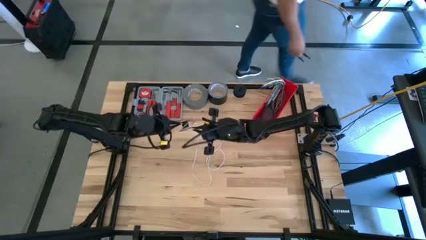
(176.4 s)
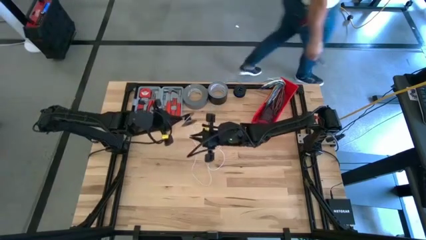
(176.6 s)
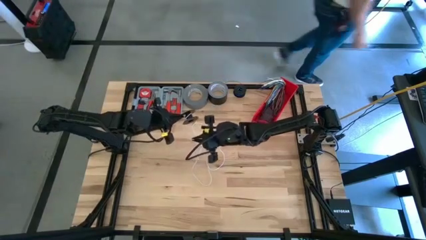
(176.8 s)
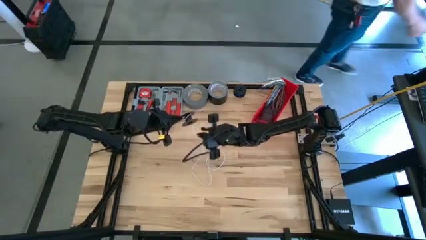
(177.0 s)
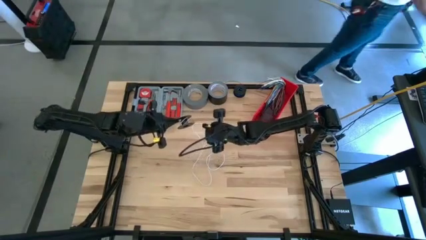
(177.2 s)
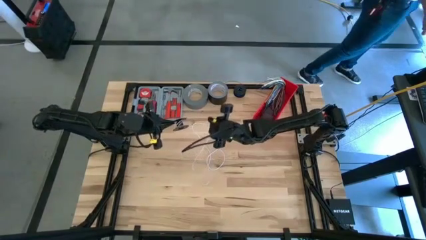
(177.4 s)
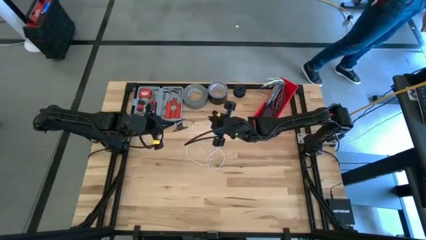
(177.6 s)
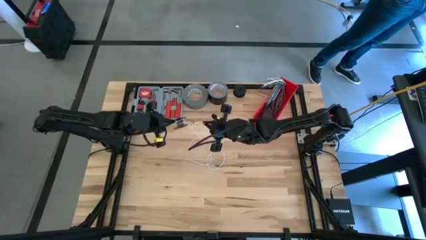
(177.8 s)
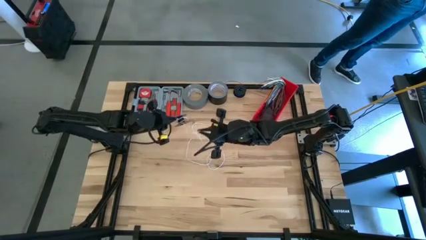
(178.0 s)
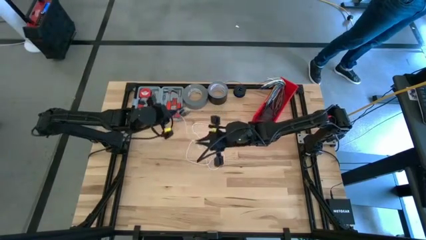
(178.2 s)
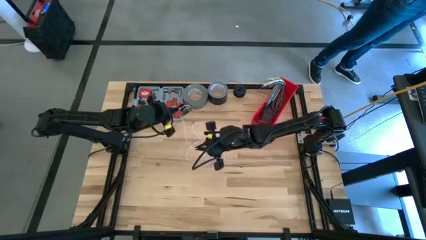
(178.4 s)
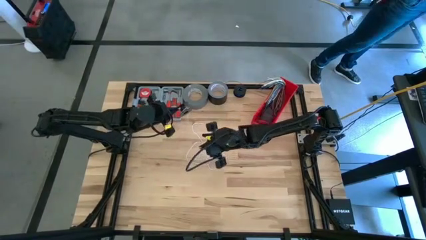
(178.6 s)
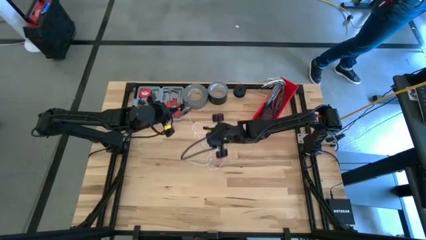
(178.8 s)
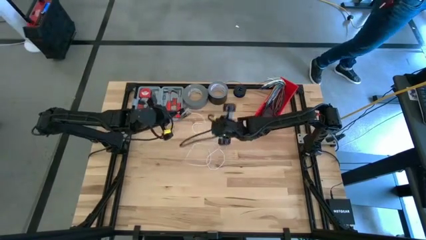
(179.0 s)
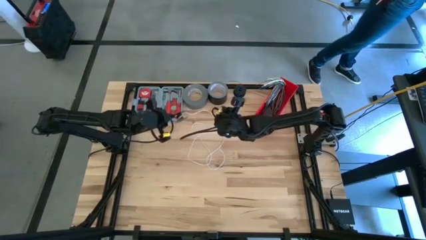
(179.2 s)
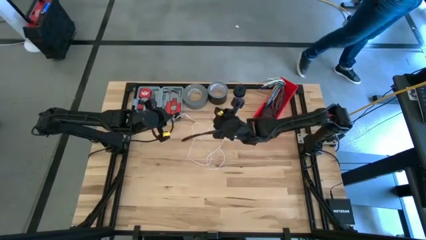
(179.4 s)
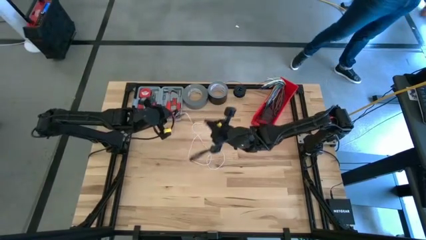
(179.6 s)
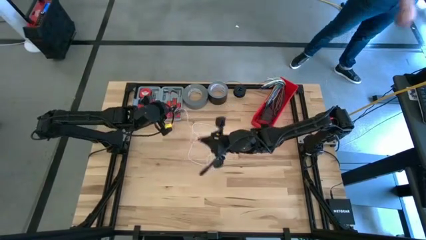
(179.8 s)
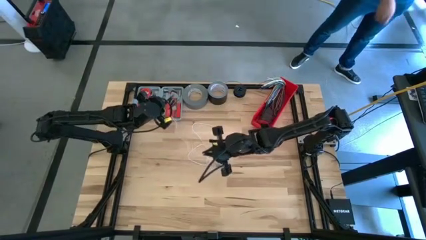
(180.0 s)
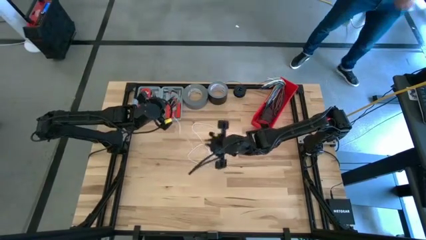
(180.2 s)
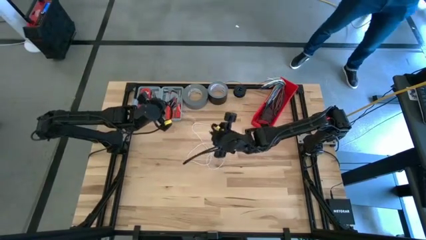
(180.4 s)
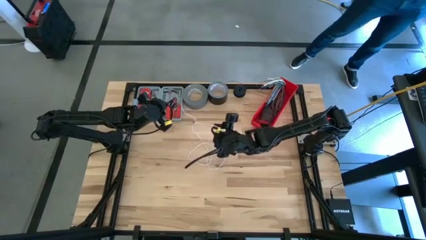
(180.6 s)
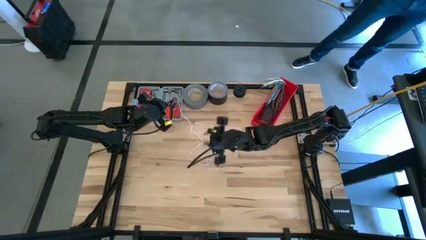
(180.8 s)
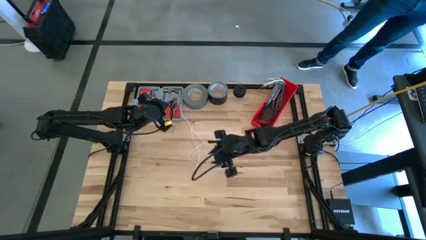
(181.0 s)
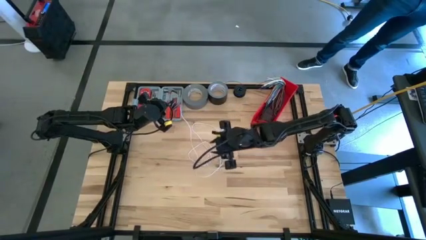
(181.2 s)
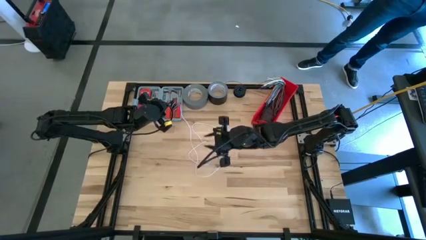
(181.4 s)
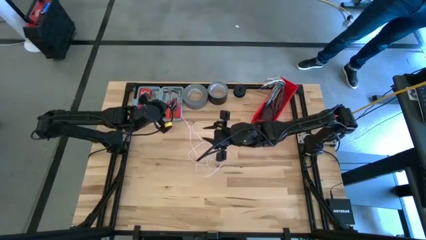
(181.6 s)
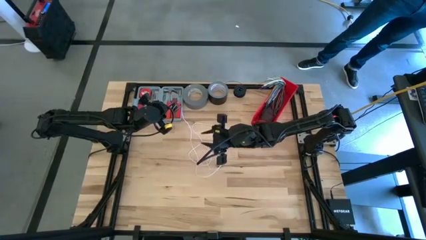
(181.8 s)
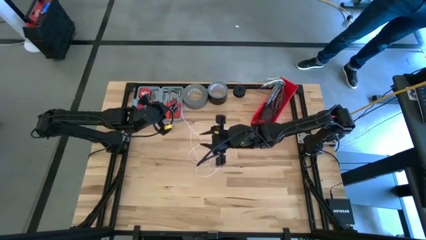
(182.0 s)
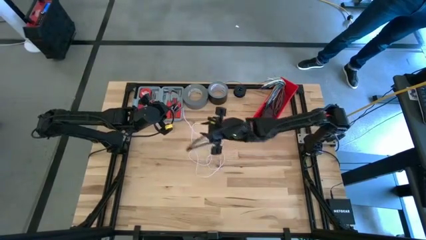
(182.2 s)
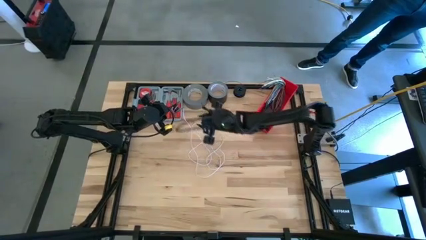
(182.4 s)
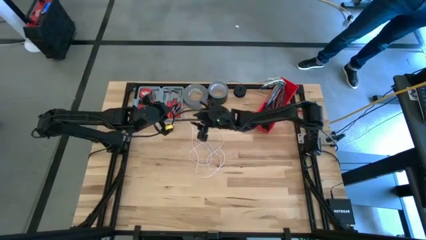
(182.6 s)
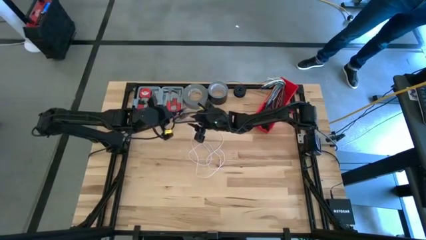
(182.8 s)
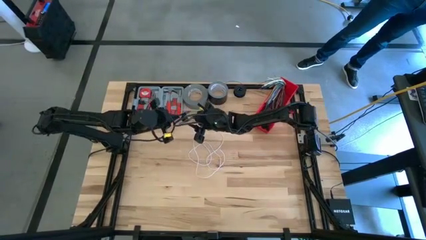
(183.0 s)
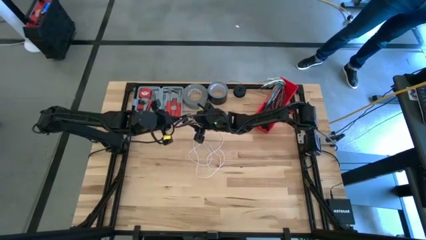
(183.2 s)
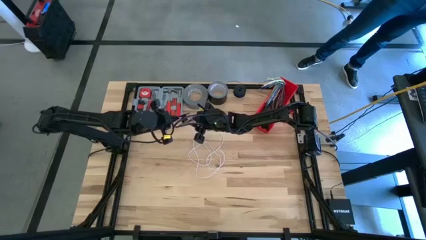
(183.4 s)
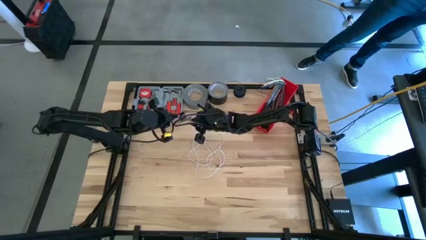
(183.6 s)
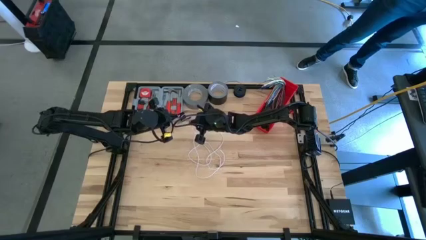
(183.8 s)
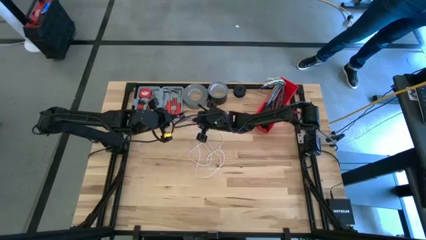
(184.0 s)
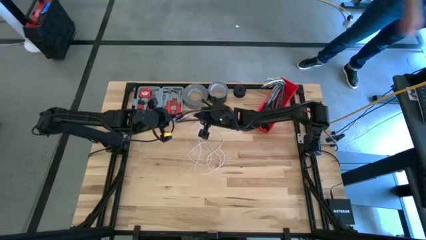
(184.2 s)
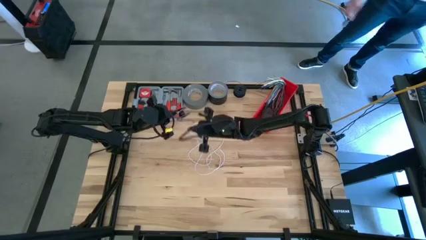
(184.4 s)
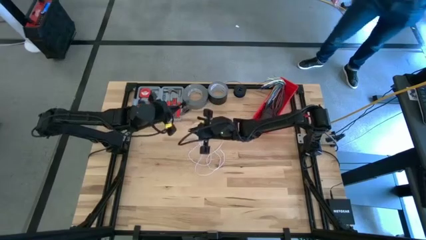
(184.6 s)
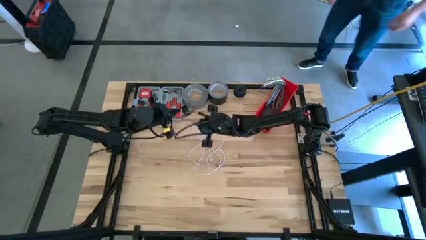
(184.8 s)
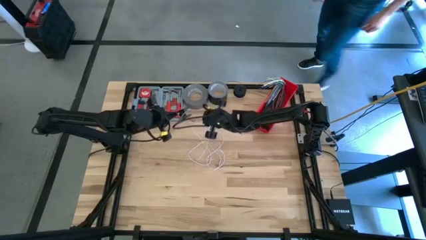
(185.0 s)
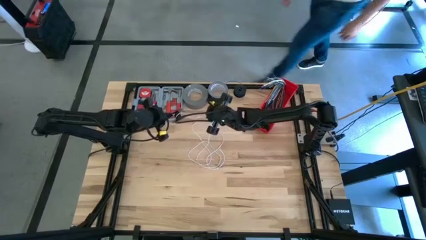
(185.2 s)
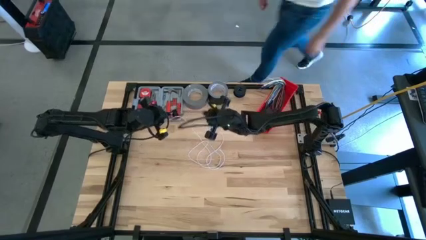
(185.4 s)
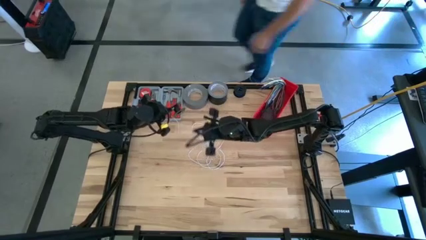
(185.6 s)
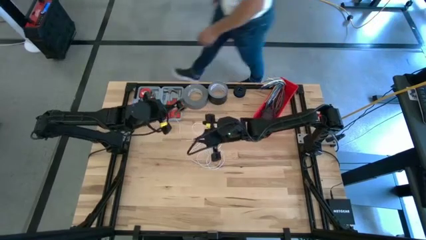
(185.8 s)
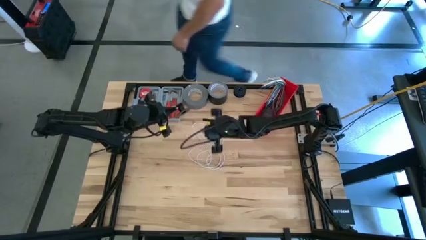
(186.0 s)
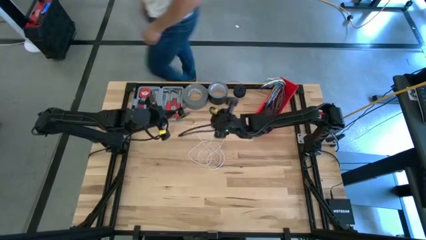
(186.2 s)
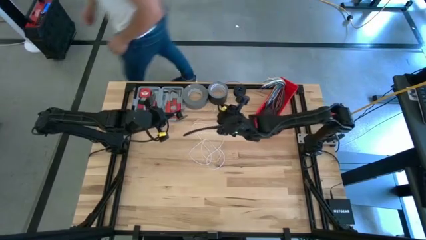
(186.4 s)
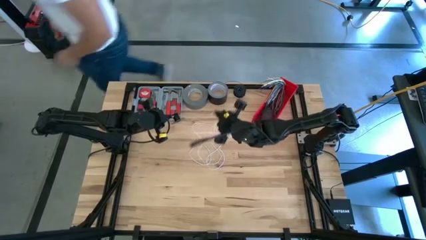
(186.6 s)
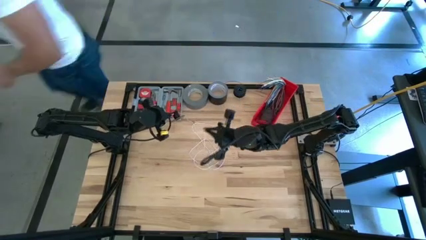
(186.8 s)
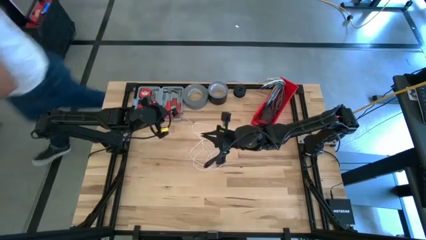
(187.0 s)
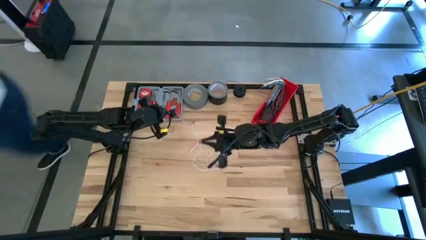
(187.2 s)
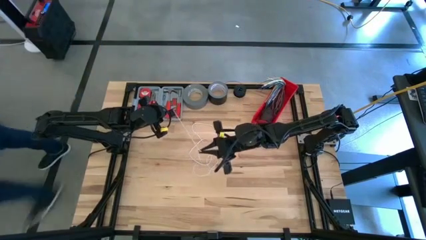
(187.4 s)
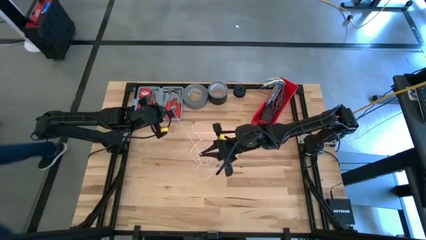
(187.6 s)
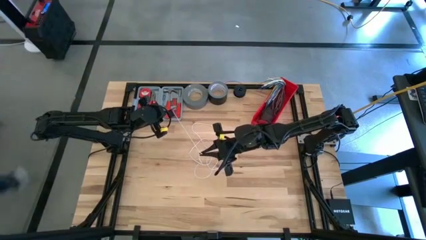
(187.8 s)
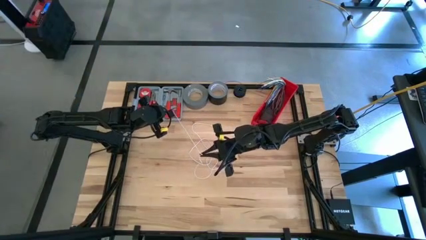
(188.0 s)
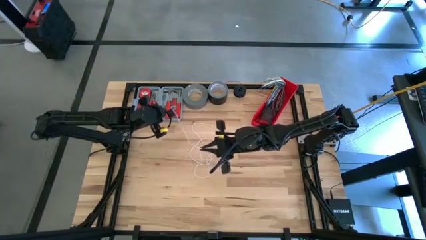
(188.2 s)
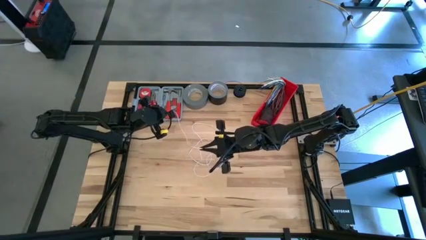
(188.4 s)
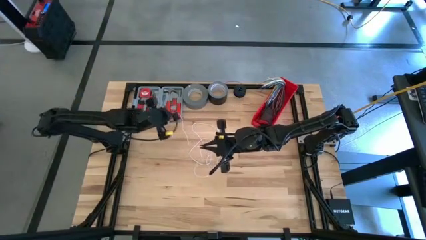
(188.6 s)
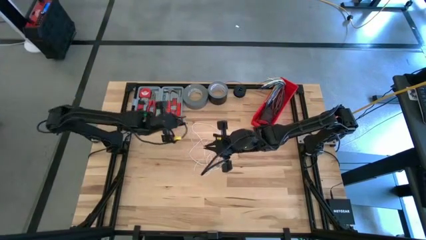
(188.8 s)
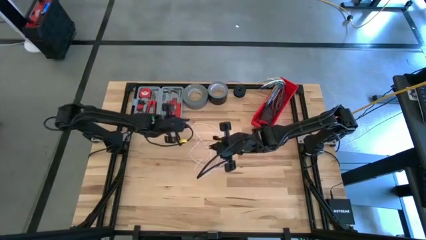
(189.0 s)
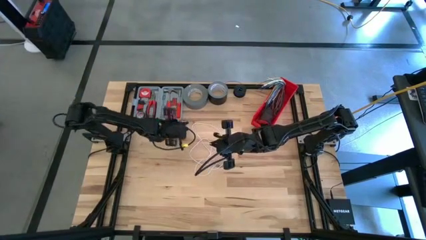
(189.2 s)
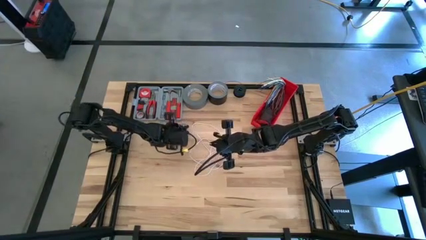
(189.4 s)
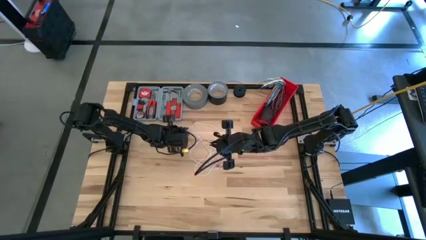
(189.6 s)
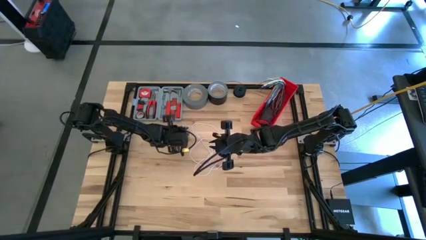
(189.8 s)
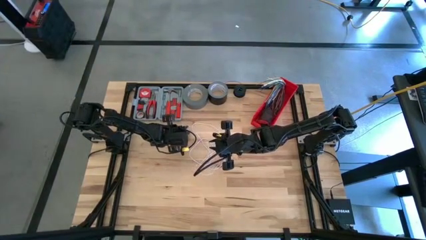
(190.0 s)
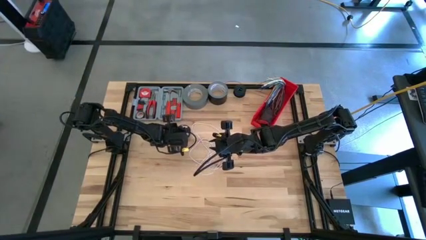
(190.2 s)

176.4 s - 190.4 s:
Task: Coil cords
Uncoil the white wire from the black spool
